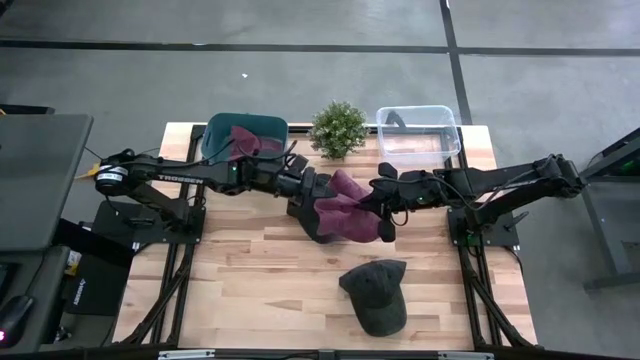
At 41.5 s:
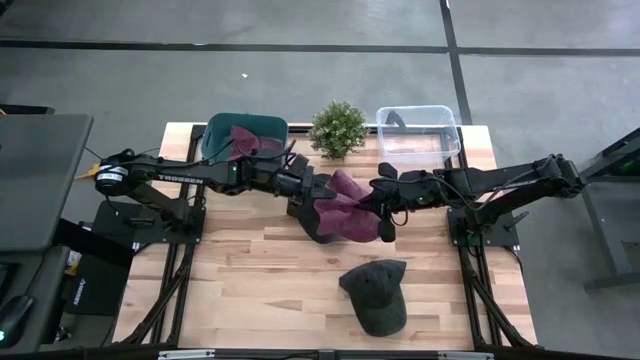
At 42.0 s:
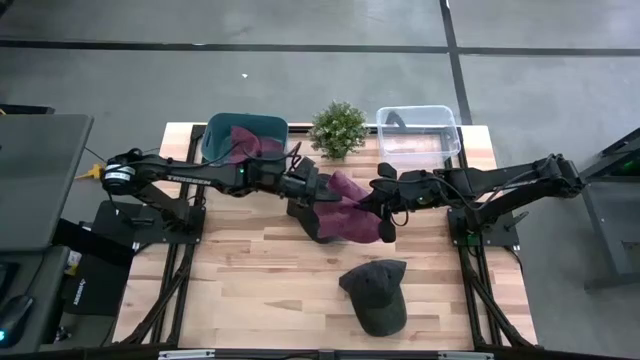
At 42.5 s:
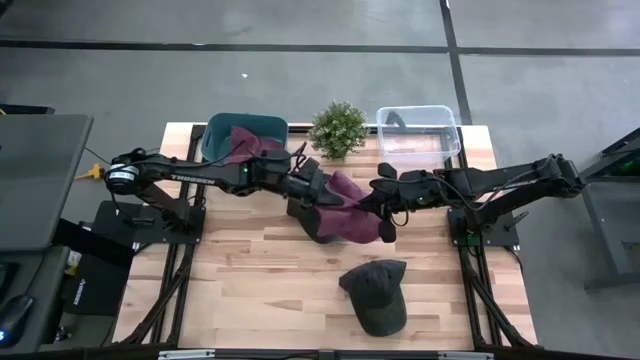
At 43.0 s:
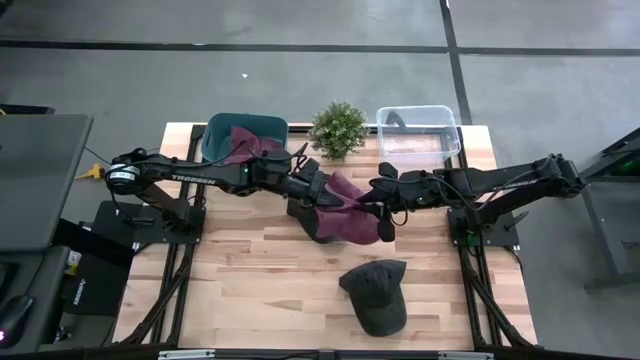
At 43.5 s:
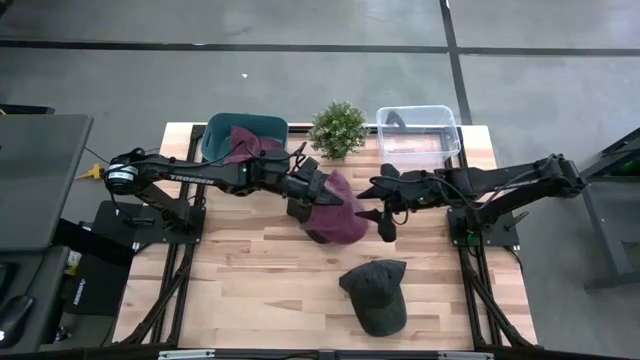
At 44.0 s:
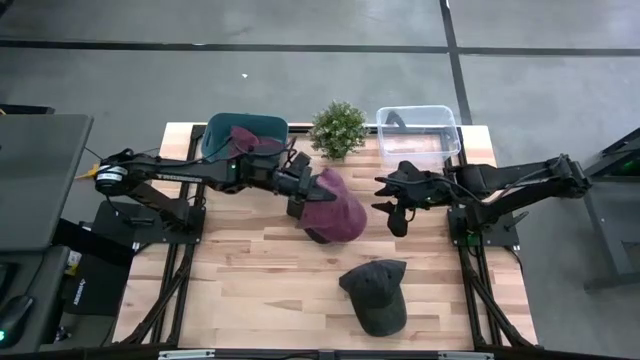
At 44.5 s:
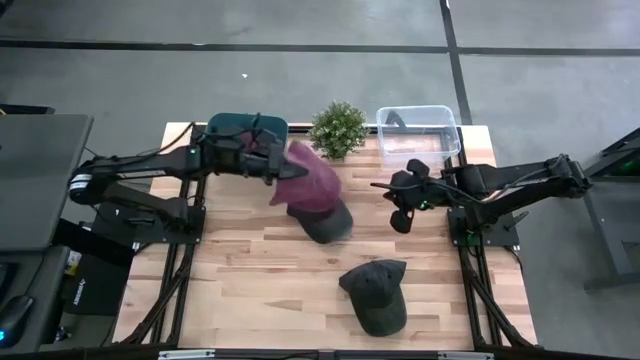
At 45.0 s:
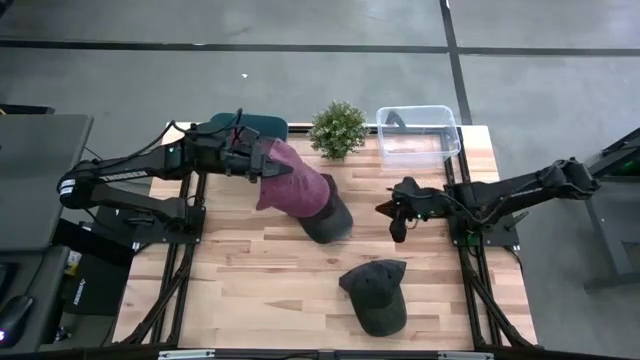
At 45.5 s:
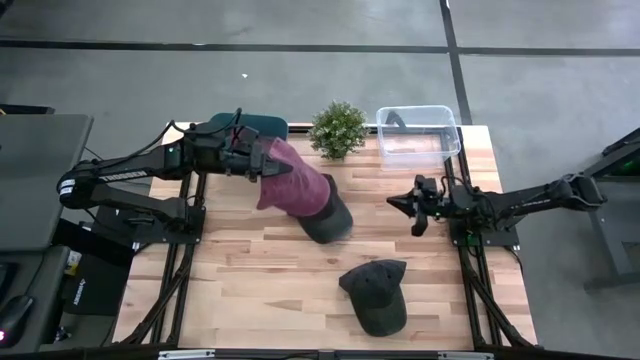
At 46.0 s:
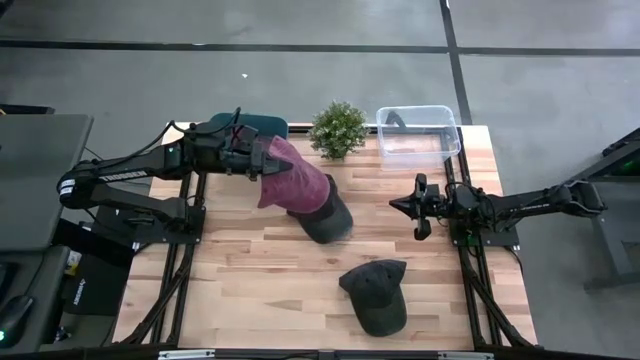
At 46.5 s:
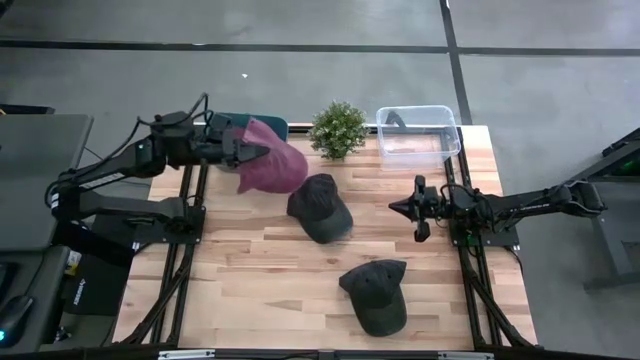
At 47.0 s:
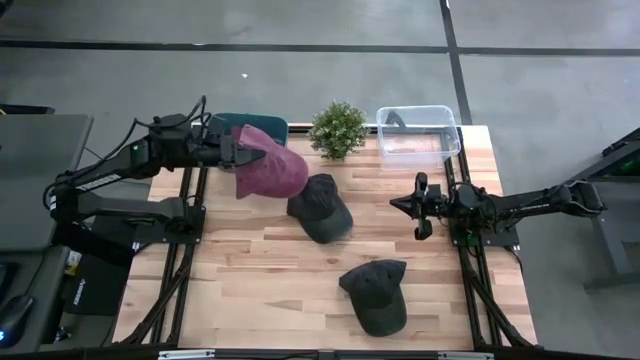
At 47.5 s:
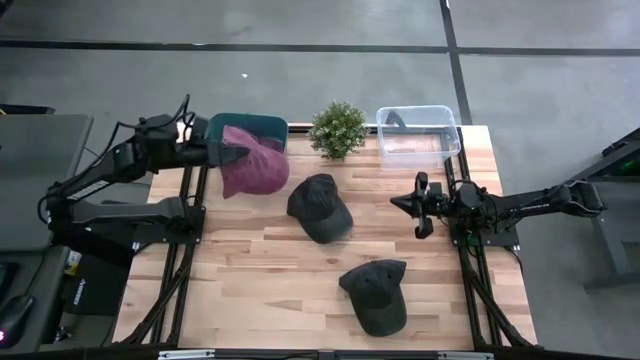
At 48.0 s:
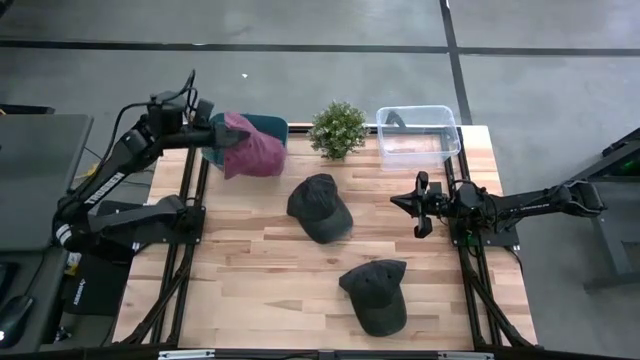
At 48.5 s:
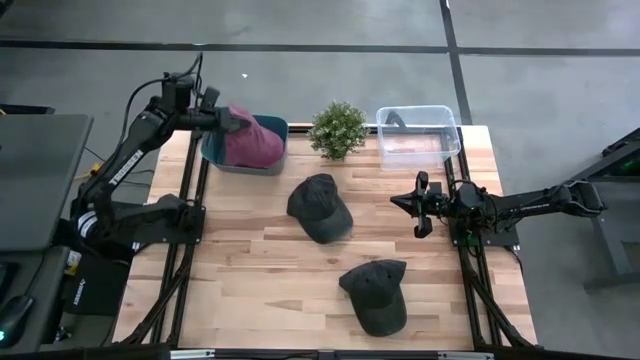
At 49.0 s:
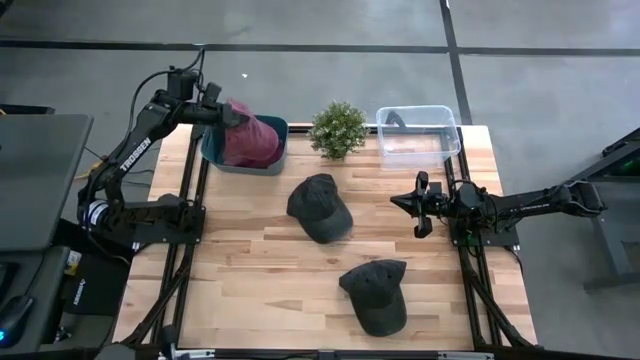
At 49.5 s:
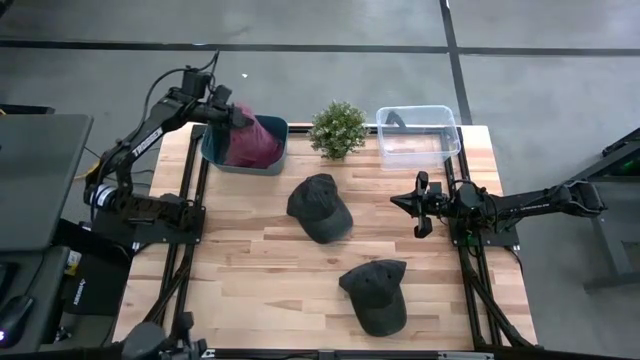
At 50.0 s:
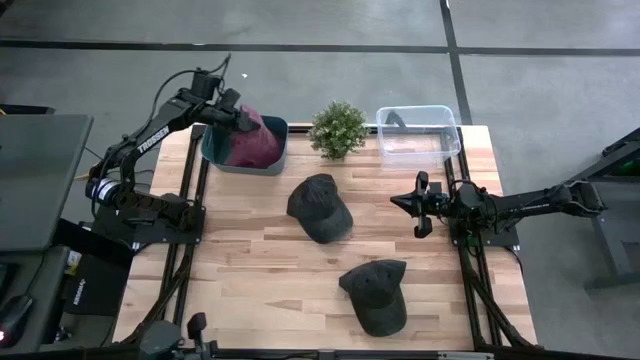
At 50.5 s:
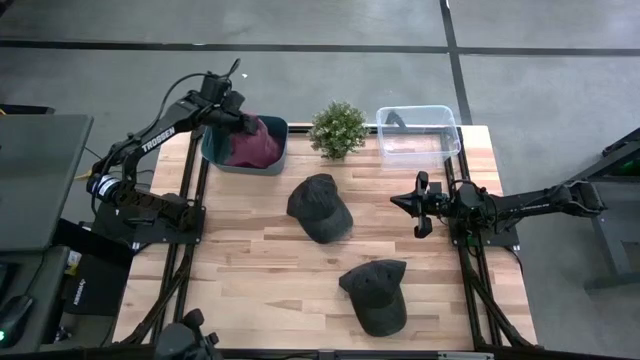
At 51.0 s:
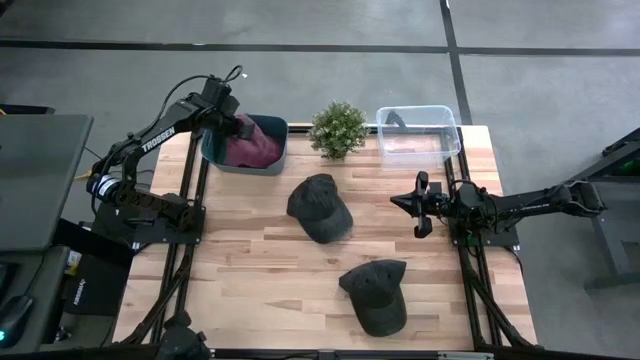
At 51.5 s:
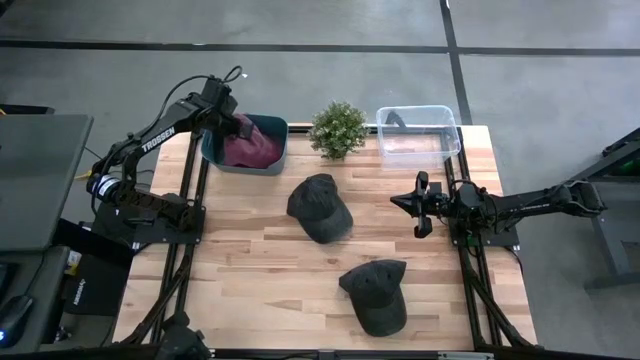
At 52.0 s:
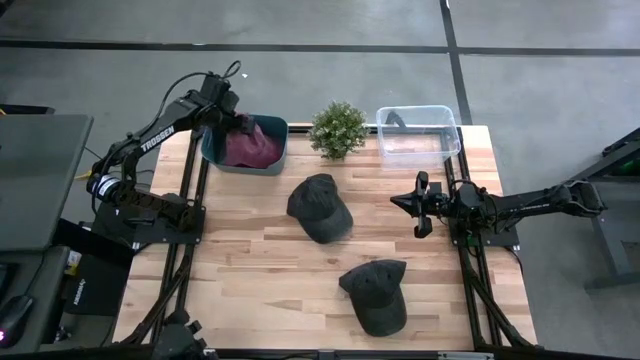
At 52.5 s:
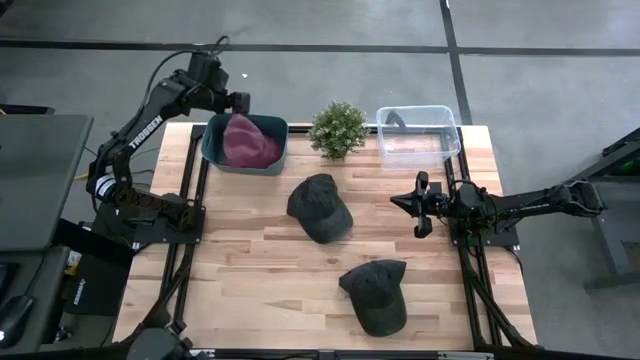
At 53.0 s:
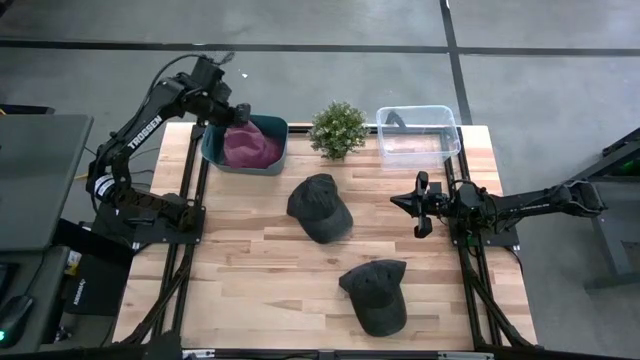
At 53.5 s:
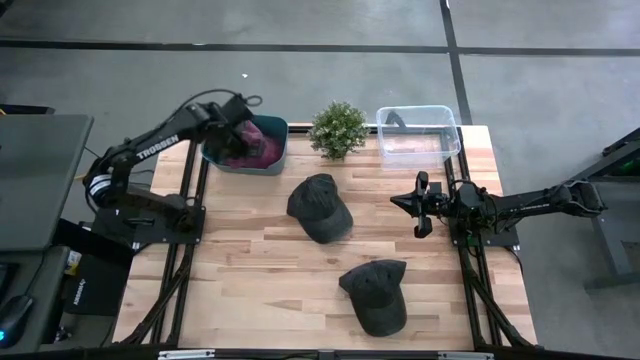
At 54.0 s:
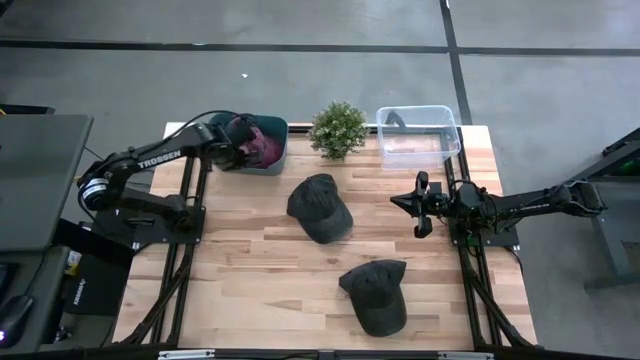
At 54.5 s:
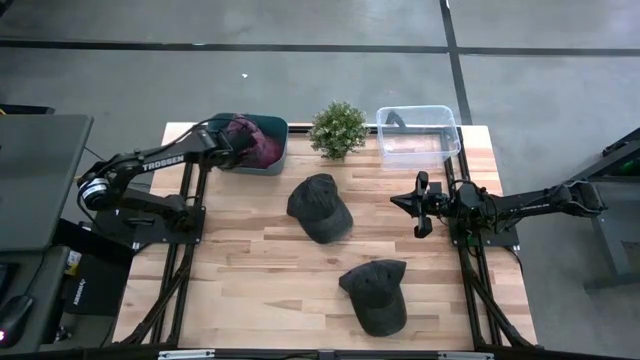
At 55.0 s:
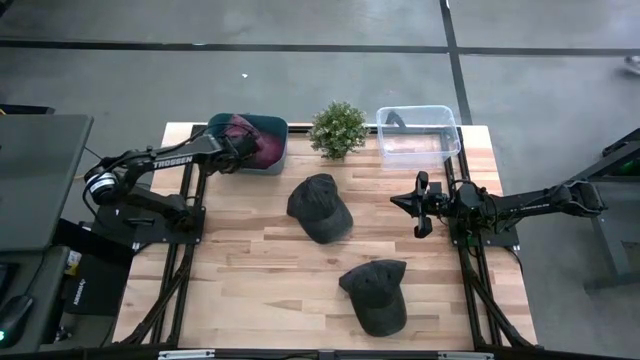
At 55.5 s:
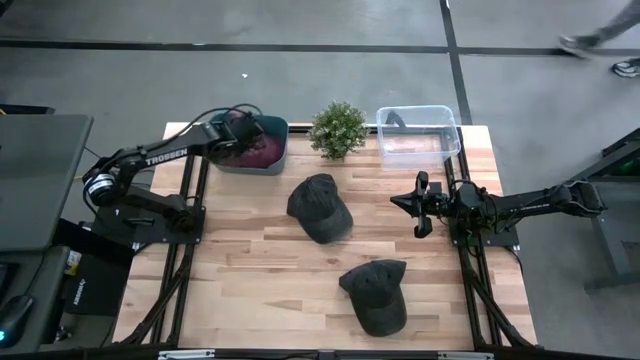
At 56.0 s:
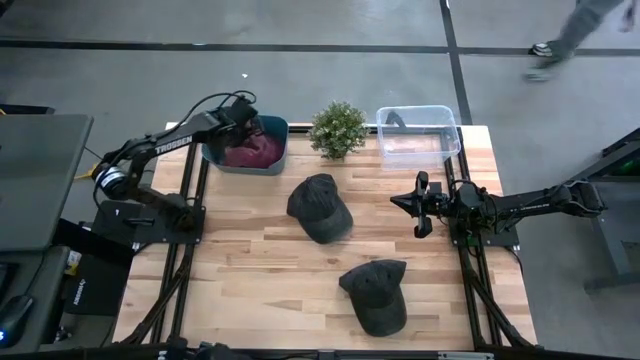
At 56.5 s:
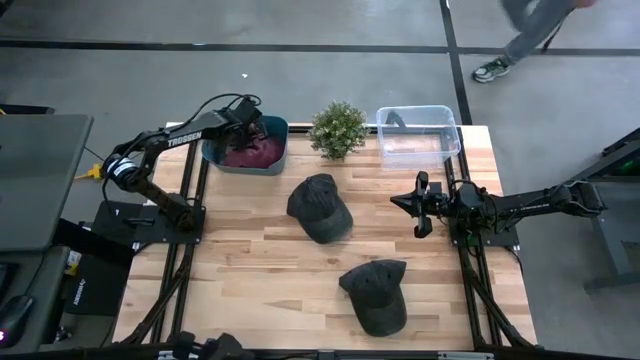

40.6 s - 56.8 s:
Task: Pick & Place hat
Put the dark red cap into the blue bin

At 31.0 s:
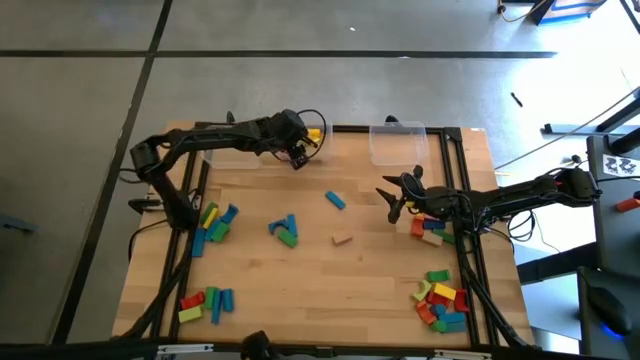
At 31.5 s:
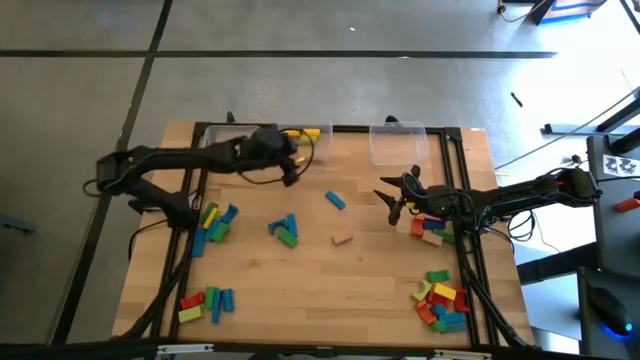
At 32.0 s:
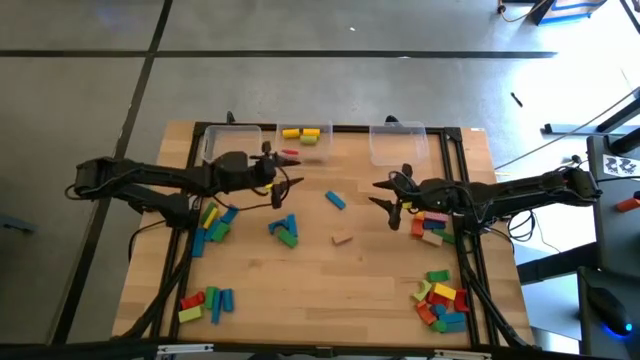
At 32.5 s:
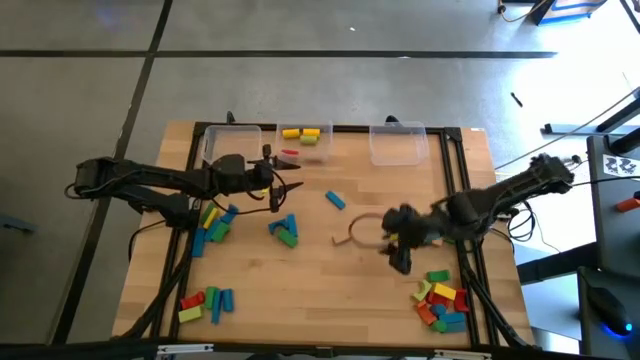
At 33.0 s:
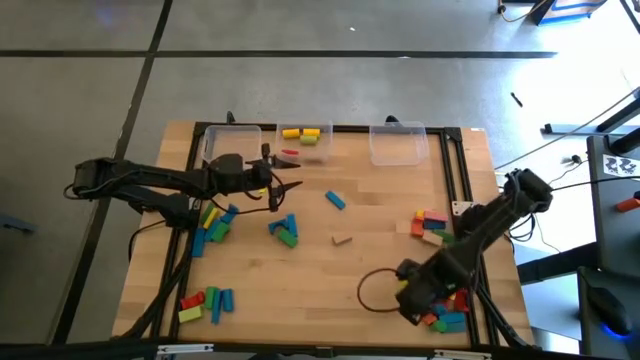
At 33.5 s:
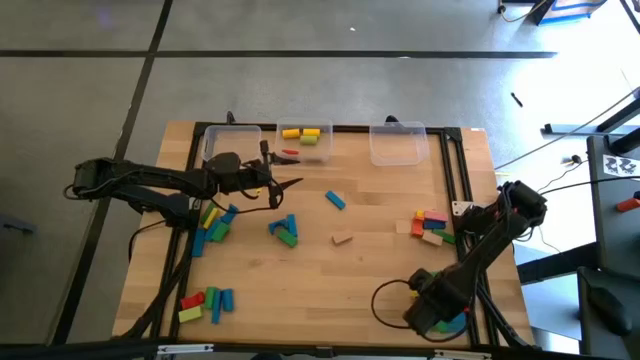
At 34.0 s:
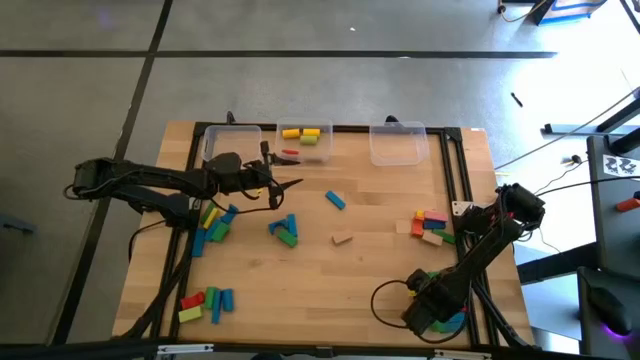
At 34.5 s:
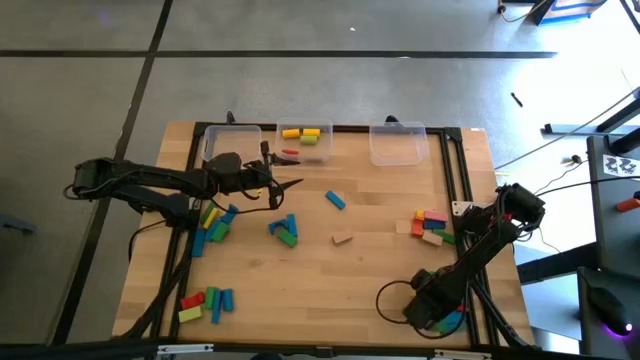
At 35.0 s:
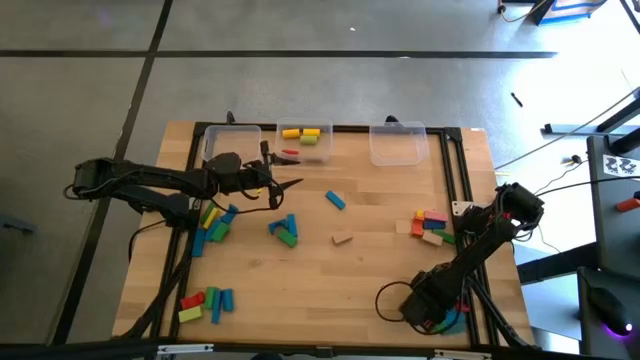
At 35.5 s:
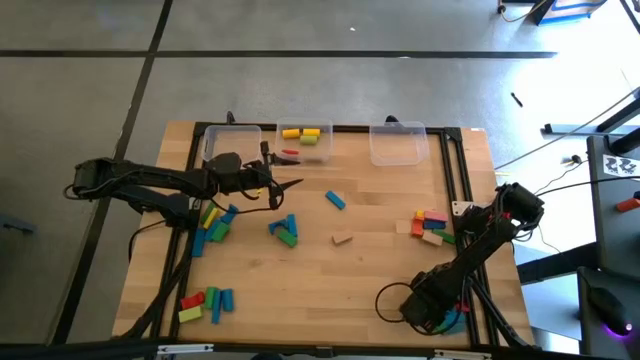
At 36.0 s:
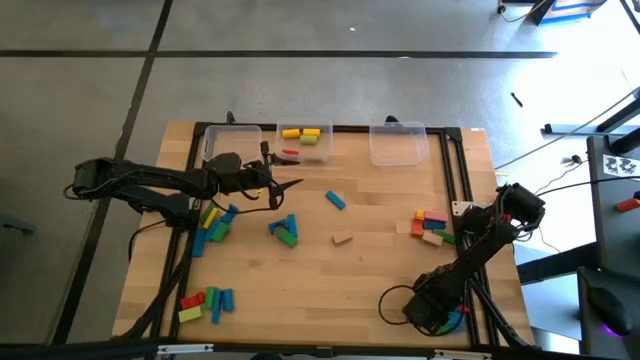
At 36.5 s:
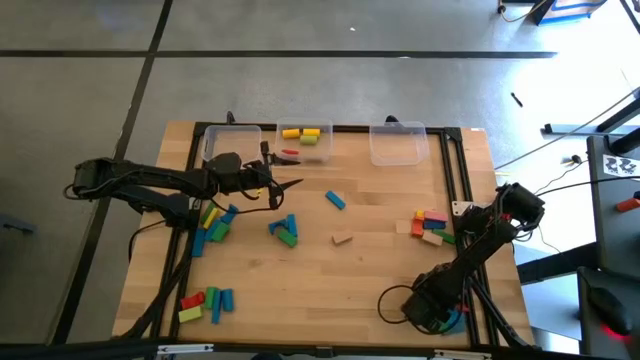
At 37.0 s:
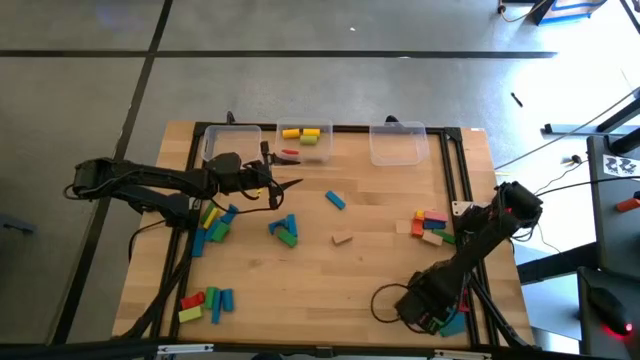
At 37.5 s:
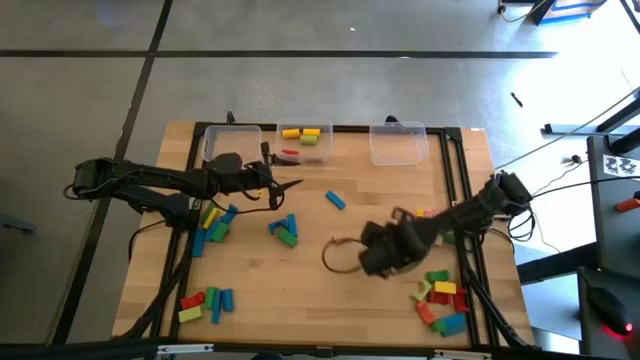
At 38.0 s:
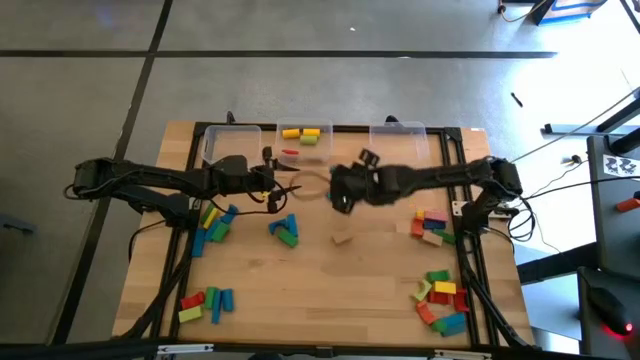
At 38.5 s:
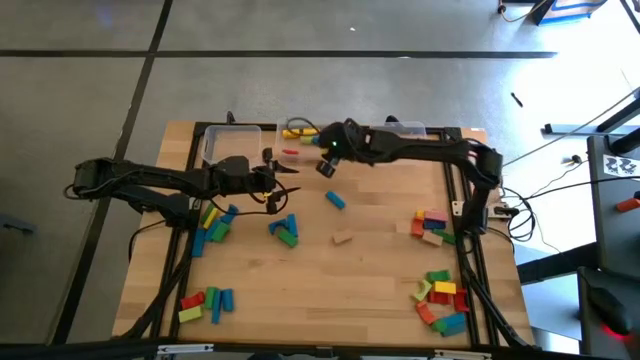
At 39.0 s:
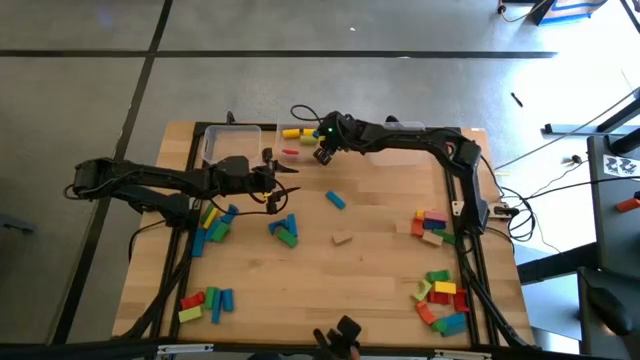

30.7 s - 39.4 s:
Task: Sort blocks by size
Put the blue cylindrical block into the middle transparent bin
